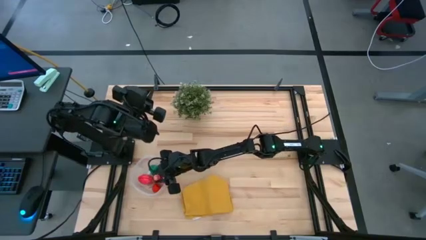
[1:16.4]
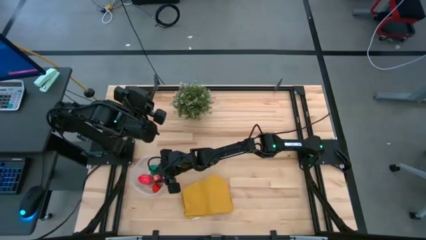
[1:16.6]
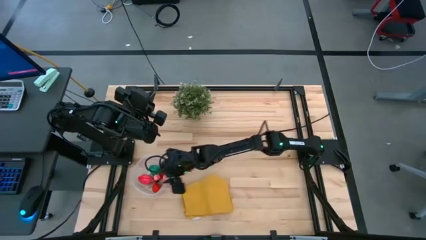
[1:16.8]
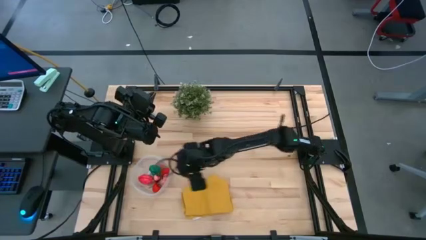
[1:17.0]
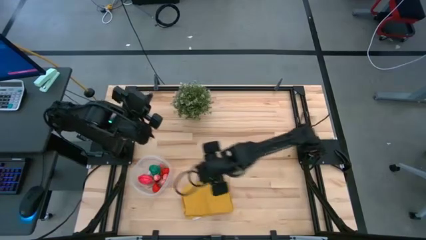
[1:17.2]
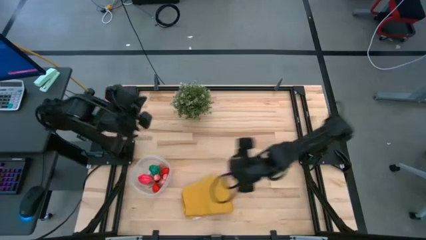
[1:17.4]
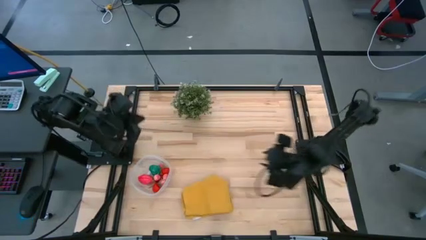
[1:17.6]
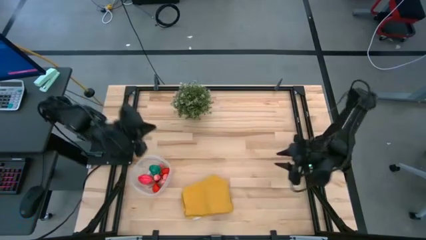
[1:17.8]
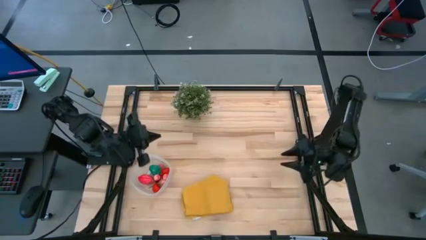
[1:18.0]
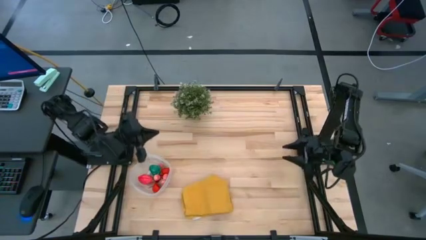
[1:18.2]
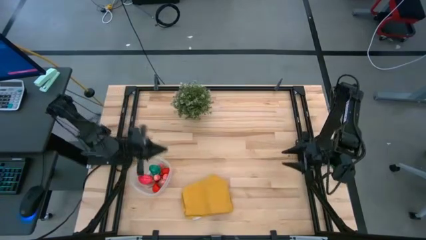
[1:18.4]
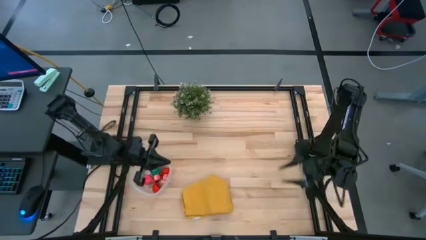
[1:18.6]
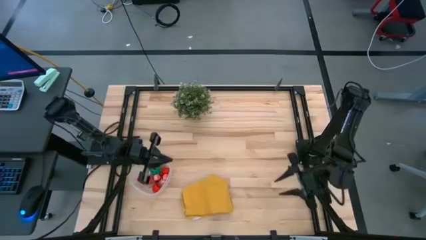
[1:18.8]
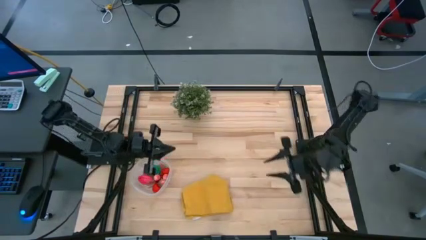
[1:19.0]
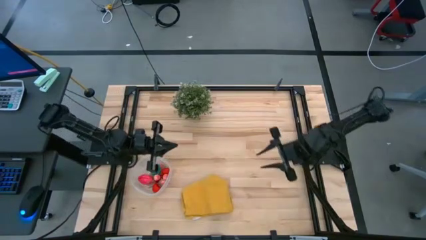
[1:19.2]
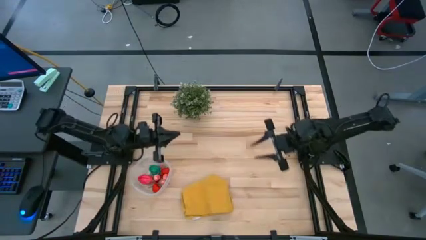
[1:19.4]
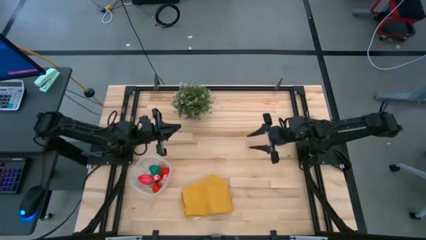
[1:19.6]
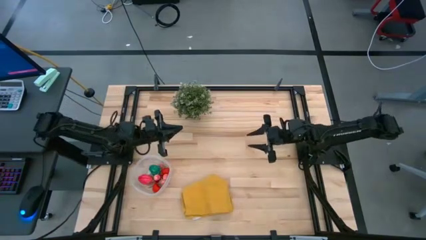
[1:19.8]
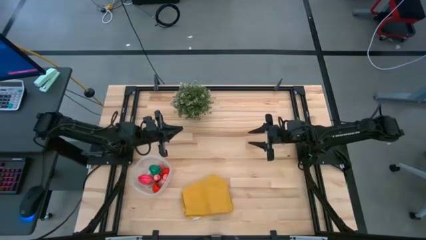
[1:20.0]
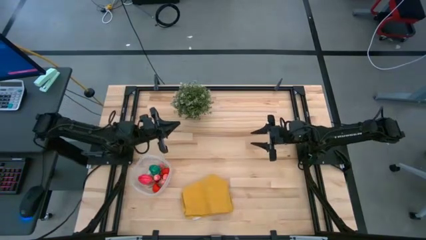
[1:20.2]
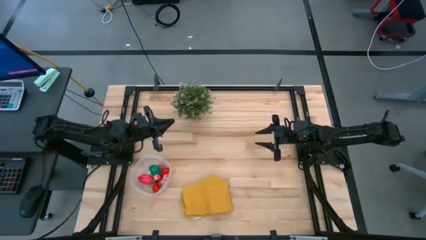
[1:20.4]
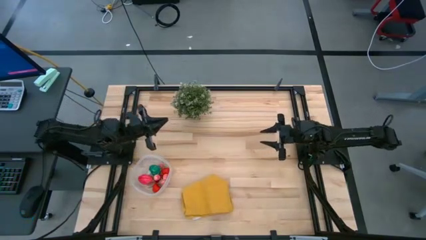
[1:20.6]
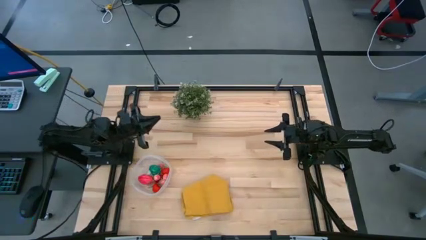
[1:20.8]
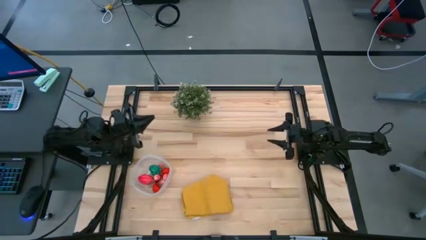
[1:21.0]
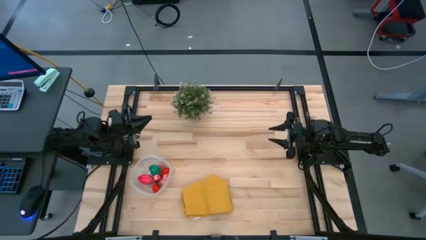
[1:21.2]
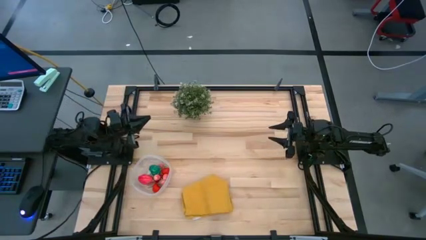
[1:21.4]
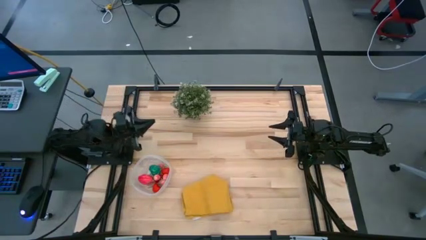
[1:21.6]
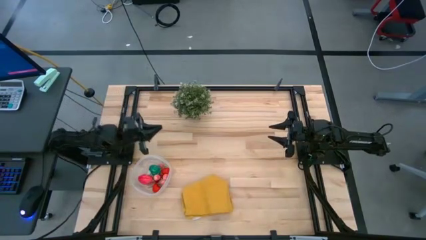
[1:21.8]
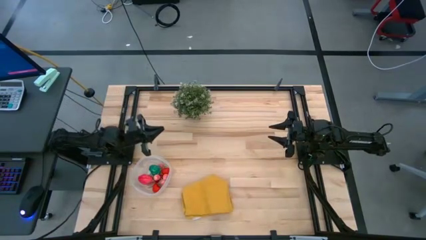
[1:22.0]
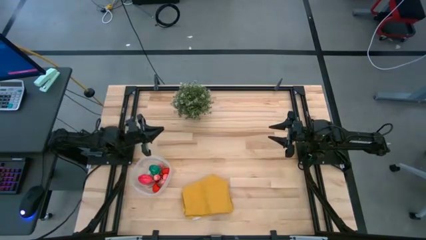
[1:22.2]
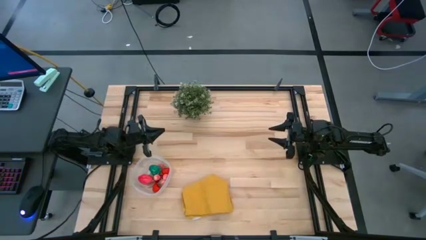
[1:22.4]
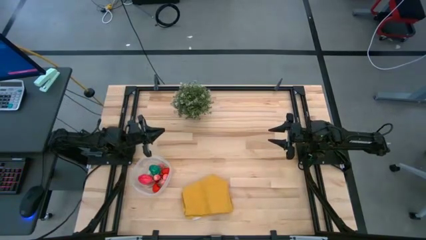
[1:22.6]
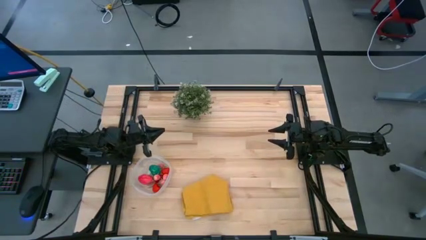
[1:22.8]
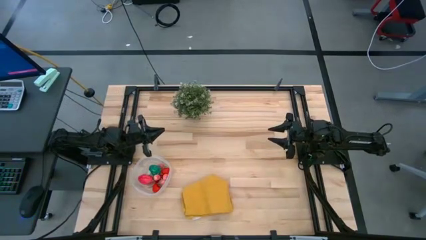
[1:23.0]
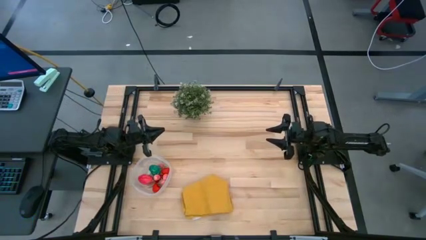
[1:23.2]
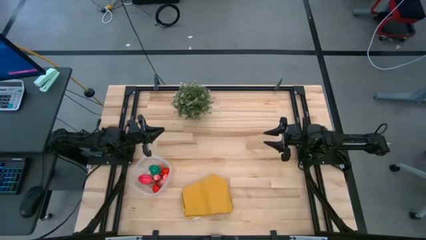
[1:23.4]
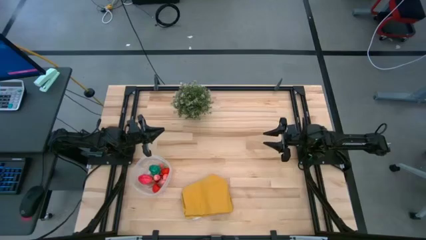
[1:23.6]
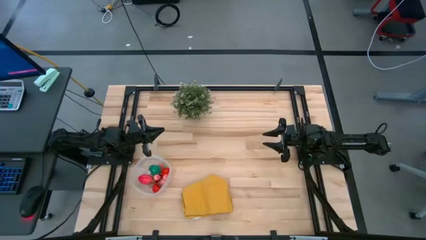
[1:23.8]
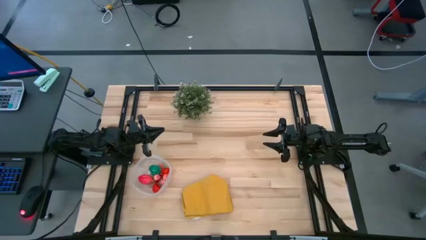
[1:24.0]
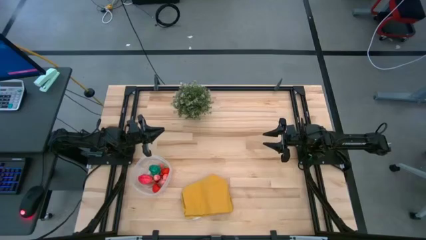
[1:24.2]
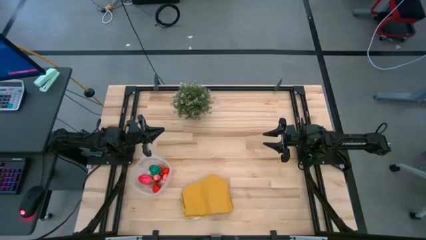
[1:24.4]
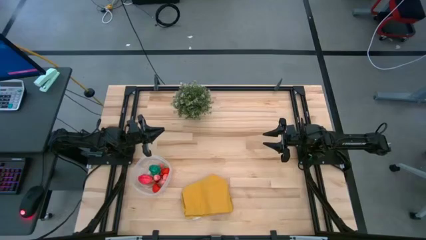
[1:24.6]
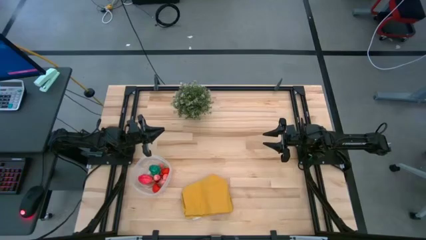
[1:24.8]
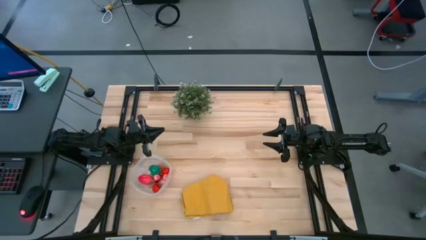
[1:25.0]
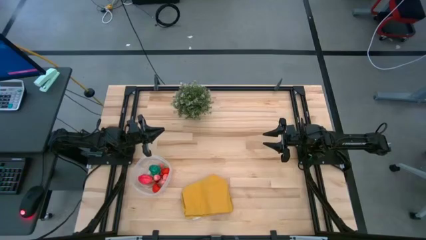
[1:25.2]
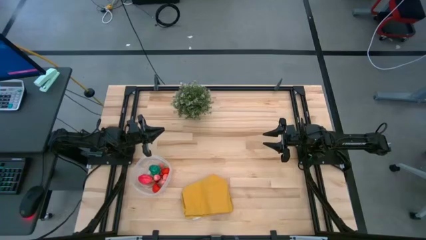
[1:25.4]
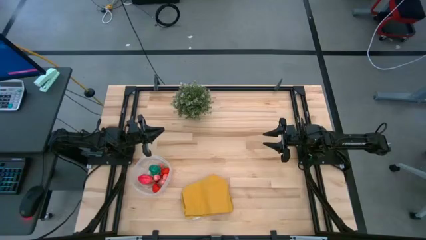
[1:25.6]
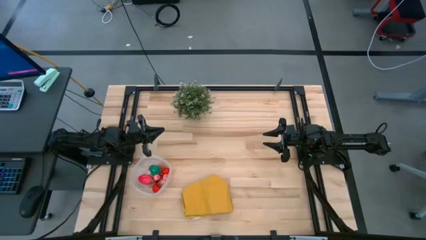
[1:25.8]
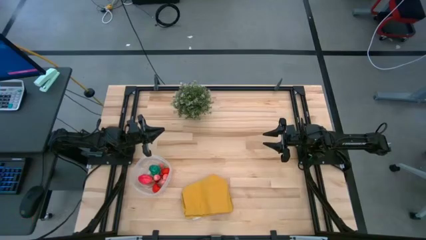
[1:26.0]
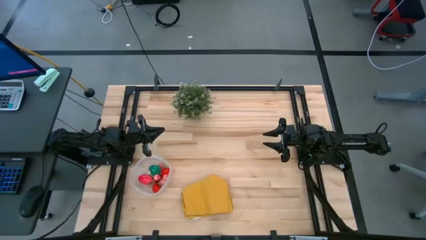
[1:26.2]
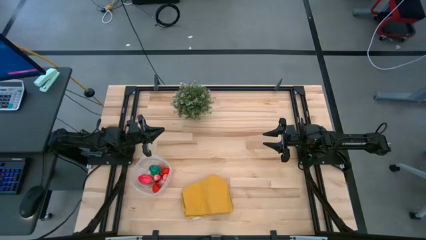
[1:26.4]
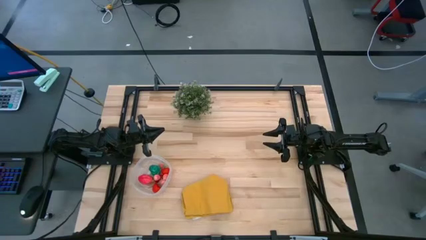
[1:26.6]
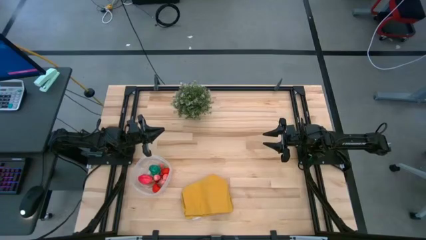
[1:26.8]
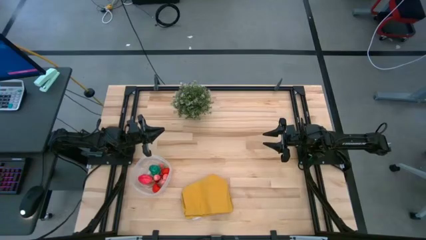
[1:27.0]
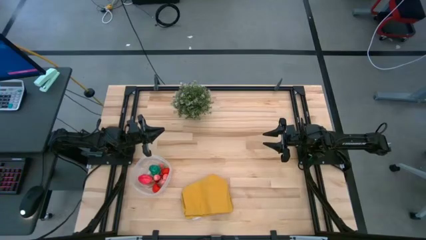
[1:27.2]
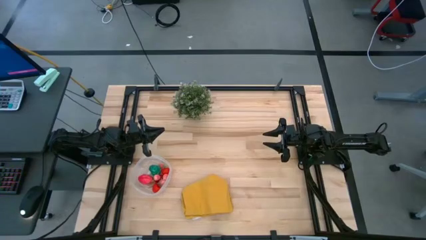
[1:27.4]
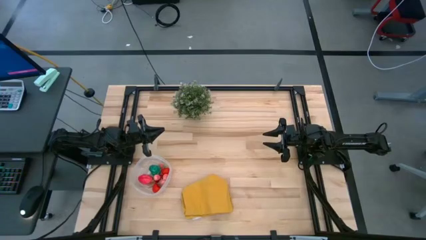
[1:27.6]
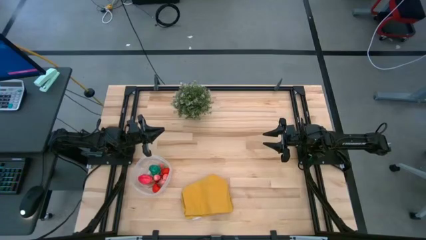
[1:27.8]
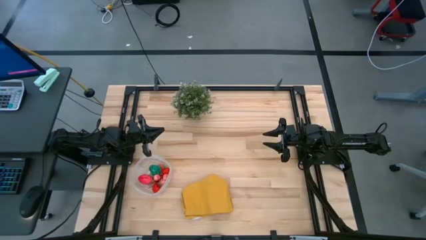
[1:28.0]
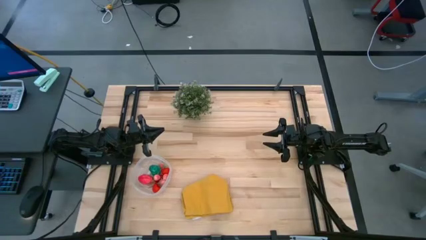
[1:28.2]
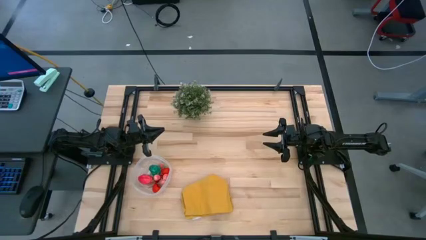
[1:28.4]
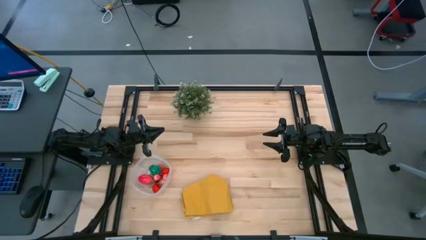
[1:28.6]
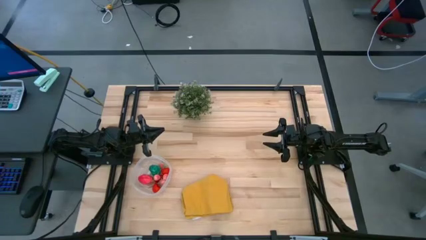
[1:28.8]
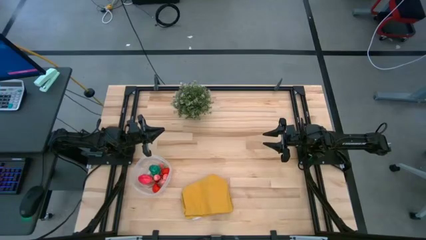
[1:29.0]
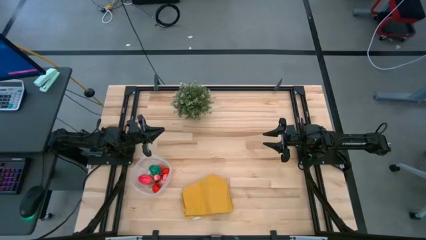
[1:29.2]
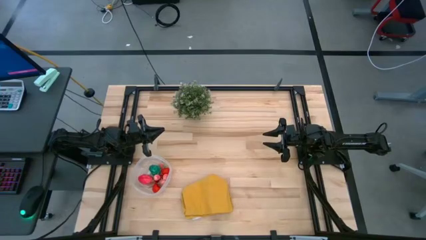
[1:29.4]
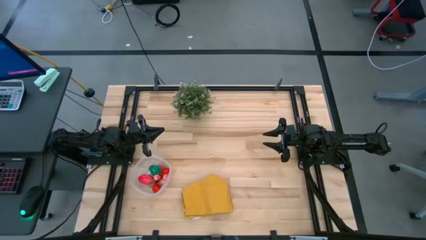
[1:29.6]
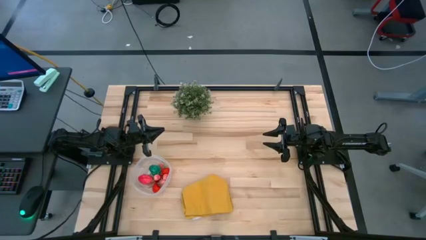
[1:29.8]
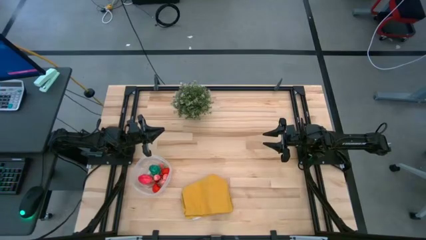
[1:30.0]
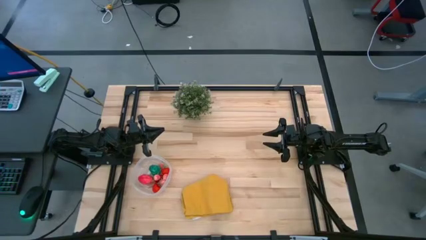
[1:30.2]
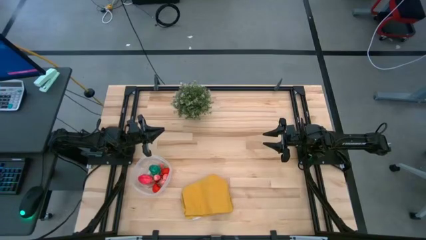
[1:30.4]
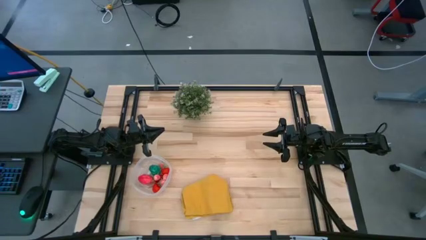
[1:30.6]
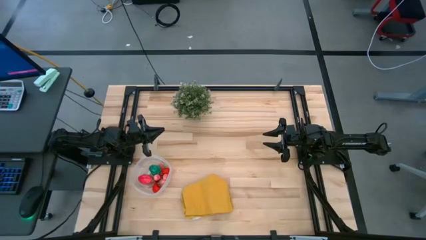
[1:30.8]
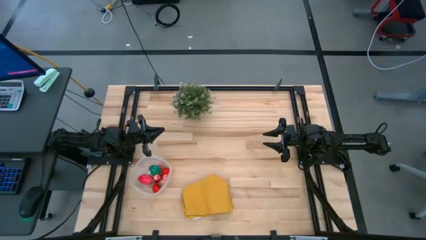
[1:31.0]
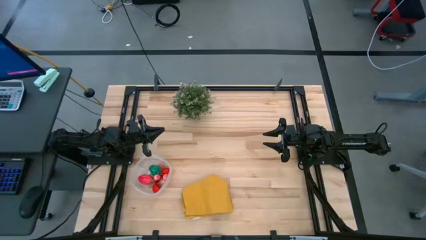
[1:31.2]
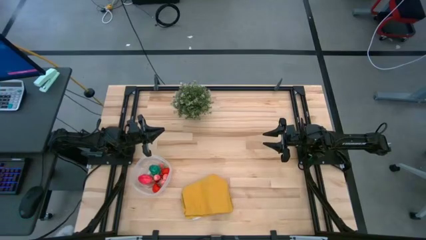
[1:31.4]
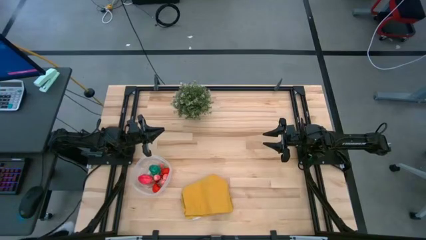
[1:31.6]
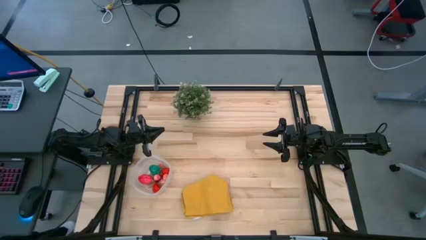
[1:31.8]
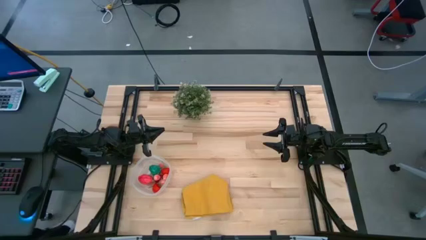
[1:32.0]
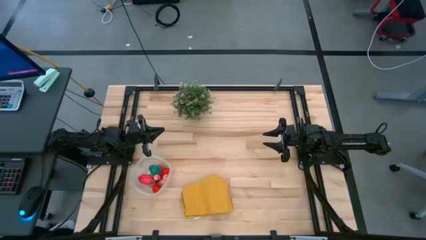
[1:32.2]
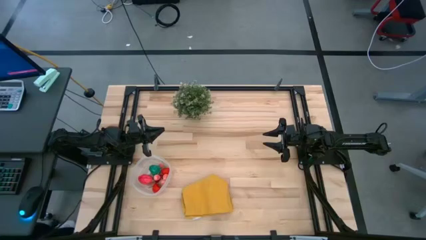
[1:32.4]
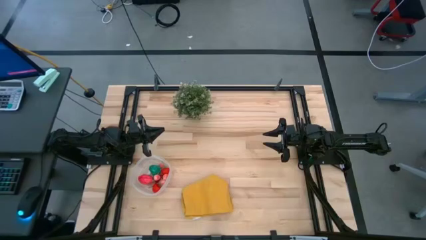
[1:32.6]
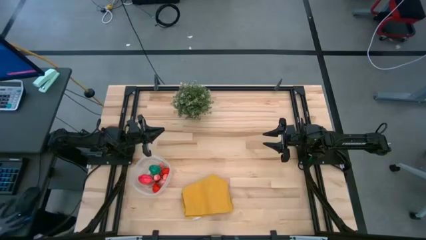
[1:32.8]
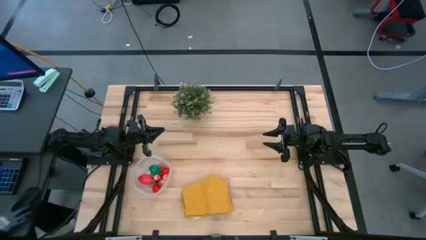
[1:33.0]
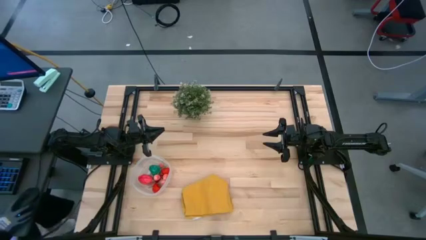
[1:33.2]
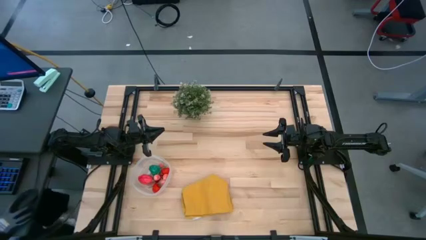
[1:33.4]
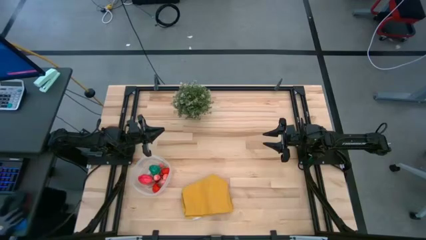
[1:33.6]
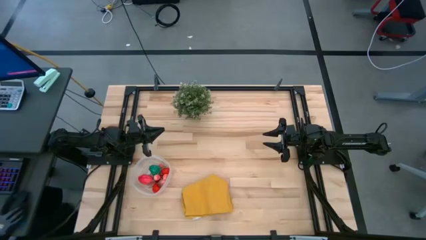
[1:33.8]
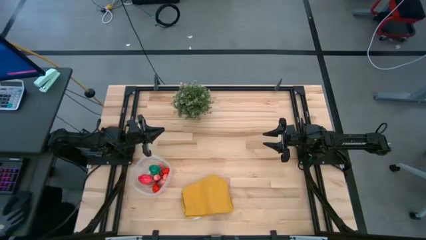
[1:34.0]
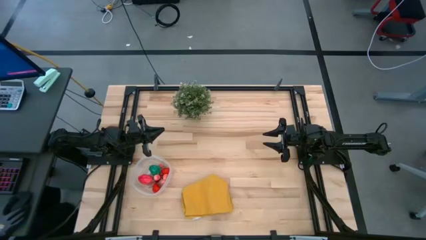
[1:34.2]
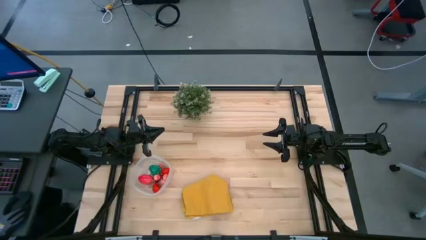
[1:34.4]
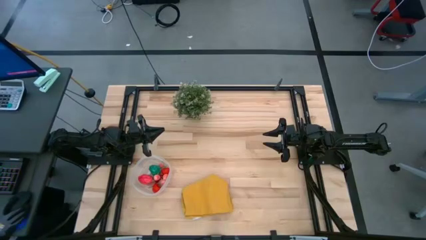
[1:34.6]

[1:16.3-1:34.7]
Task: Pick and placing Produce into tupperware
Return to Home Position
